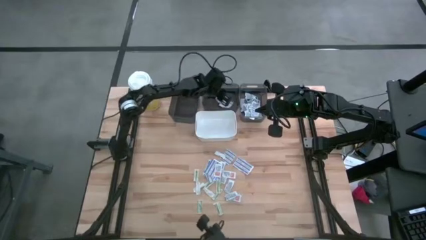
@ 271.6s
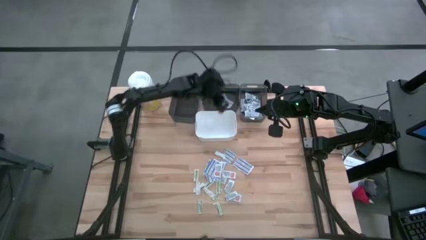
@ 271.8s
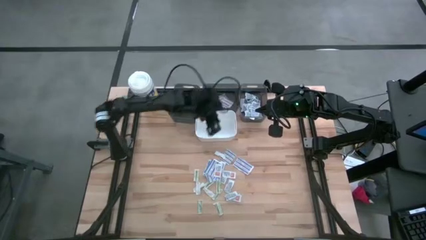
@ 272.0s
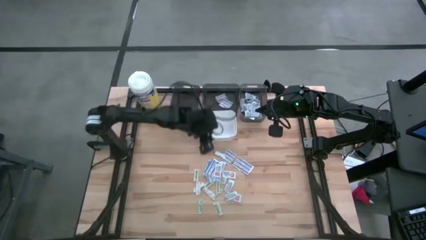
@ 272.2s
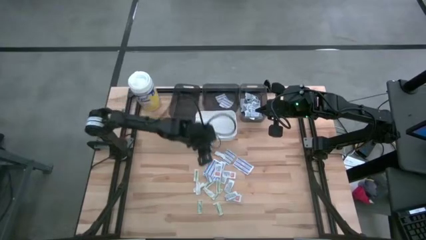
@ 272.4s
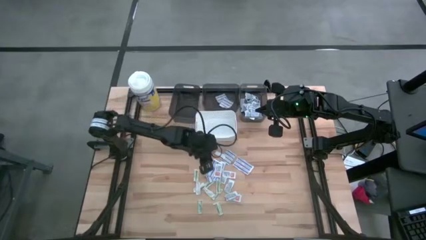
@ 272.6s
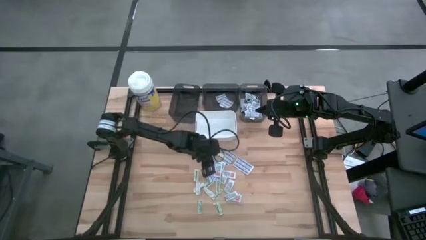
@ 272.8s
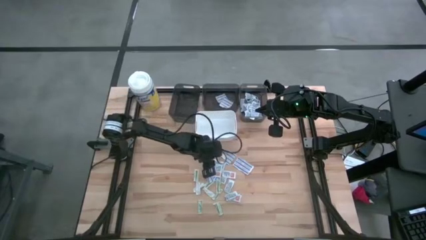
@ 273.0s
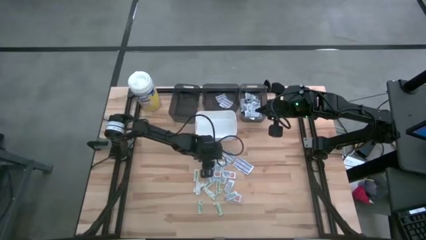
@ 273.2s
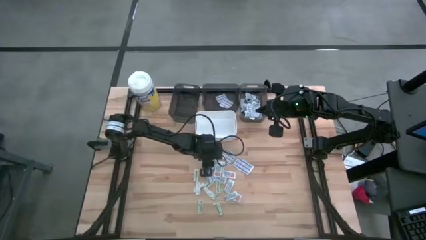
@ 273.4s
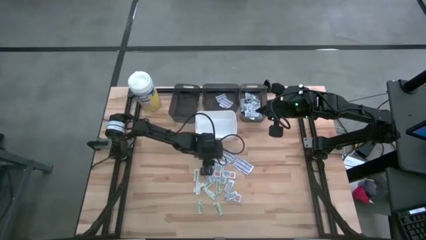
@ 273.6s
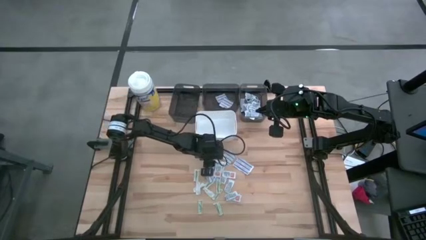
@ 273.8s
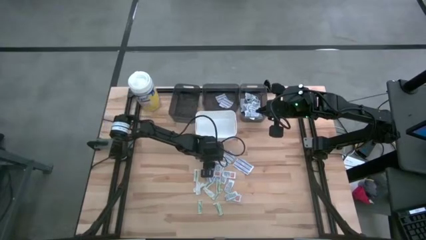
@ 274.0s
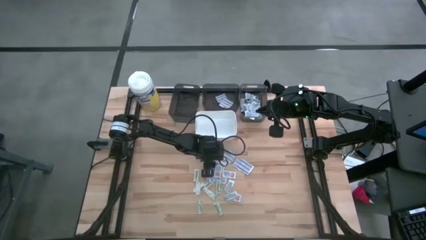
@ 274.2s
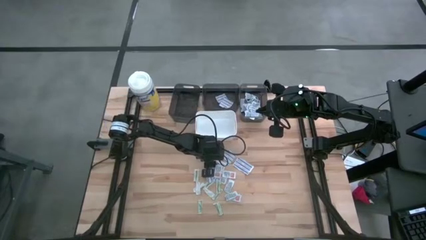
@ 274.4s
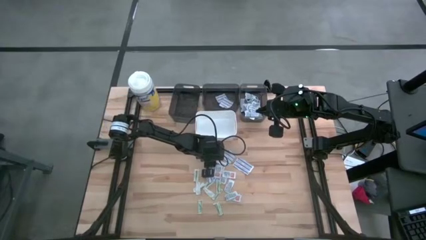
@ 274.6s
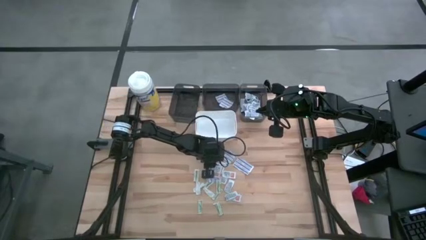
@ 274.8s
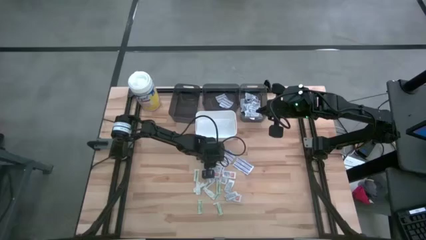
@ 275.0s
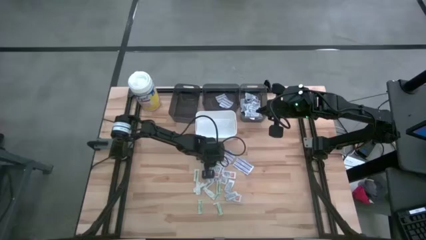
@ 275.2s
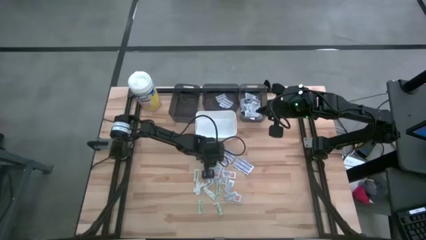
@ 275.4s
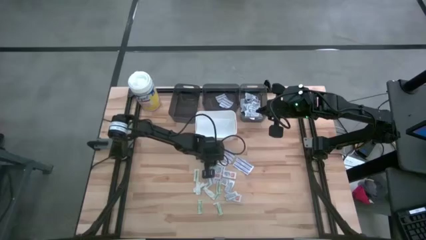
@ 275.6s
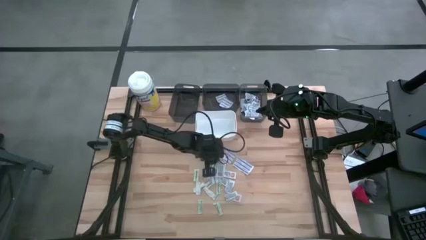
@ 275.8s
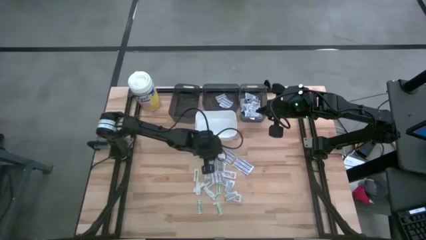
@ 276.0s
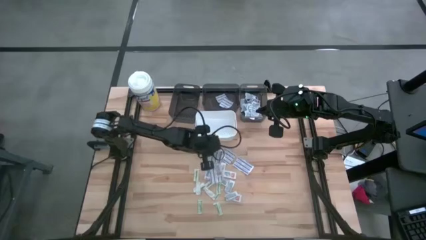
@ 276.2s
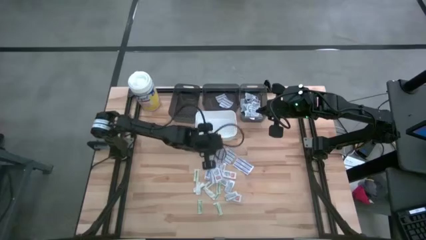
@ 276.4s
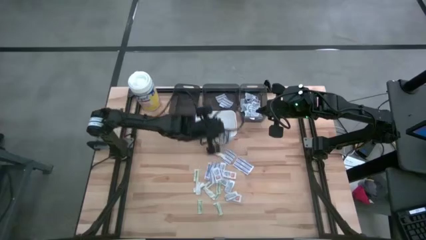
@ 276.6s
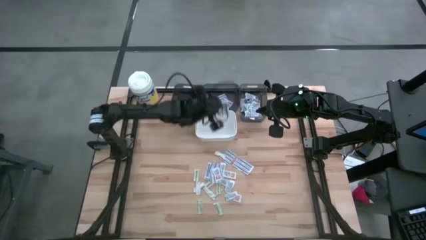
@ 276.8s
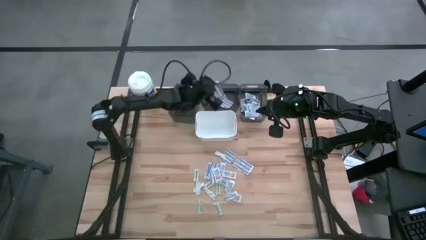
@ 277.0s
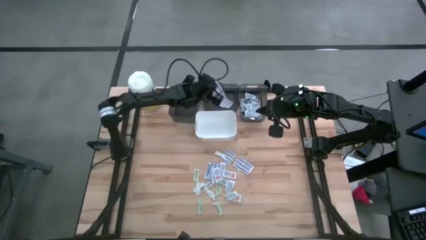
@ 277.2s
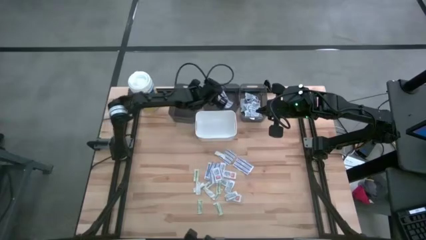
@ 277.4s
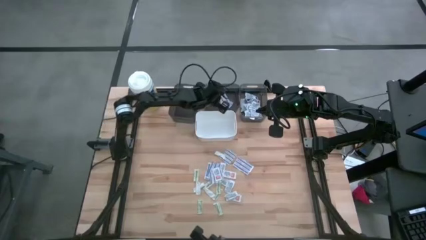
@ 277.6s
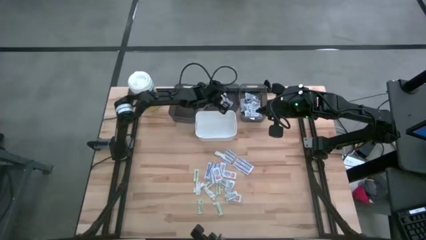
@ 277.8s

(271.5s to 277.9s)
Task: Pick & Place First Aid Supplies
Put the blue bandage pack into the middle black bin

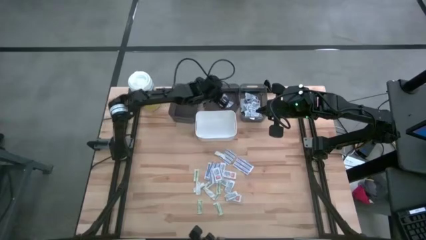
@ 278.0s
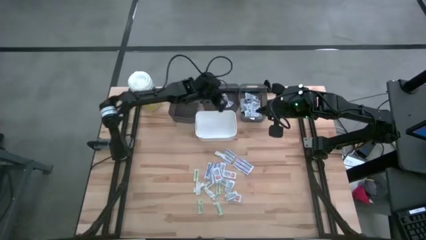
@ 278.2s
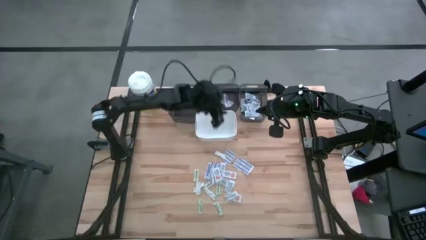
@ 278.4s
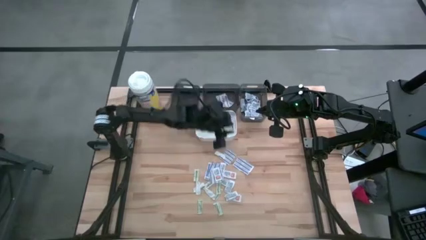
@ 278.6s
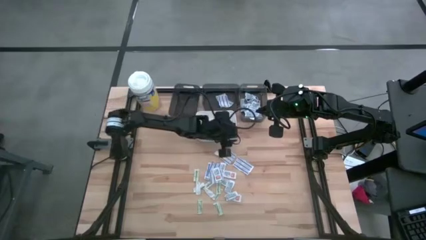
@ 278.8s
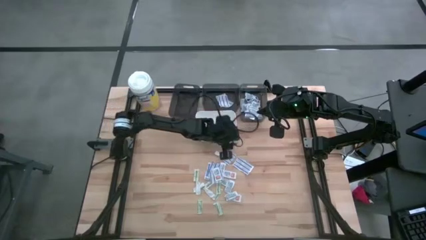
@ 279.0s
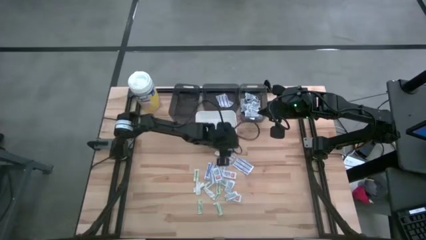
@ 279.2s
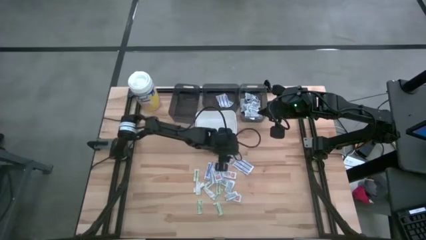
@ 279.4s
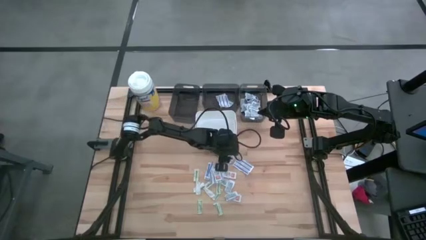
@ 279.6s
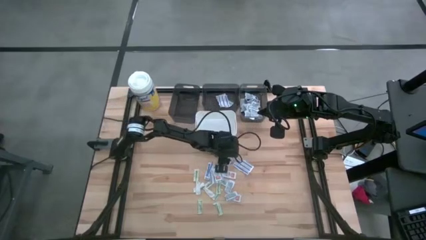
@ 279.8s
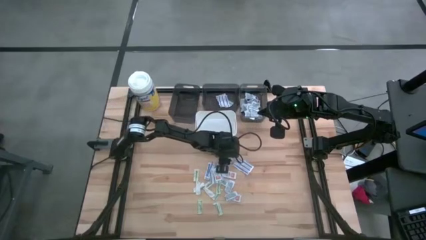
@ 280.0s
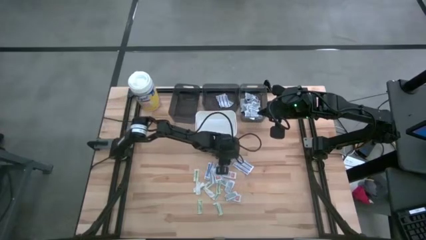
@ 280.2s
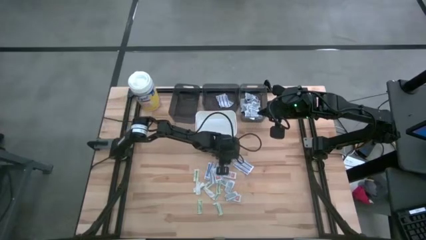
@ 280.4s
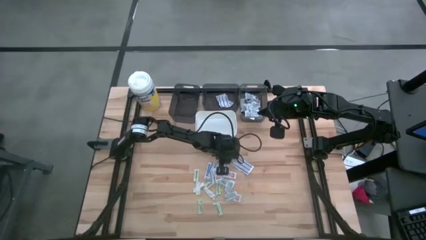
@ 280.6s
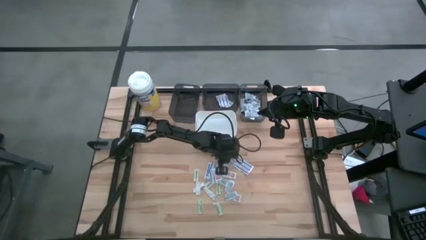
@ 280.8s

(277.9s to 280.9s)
Put the blue bandage pack into the middle black bin

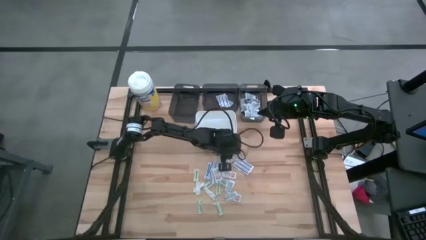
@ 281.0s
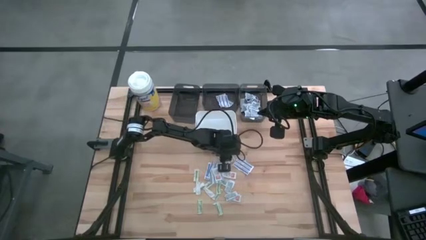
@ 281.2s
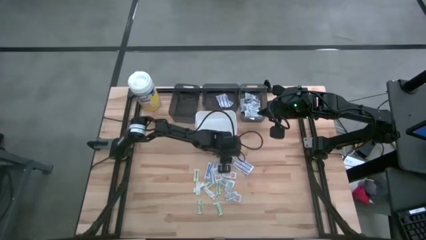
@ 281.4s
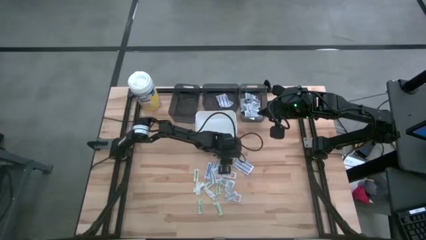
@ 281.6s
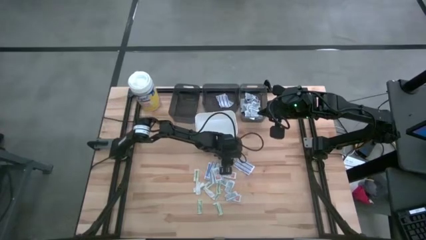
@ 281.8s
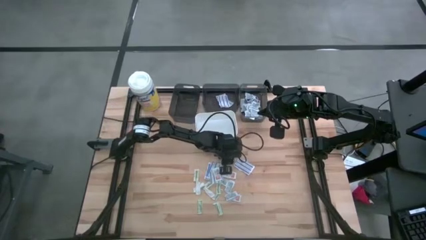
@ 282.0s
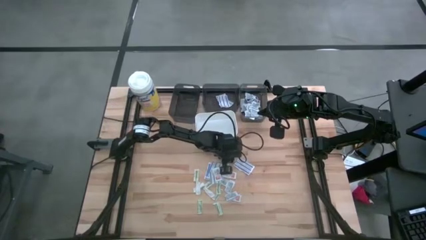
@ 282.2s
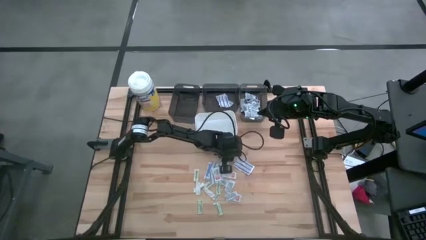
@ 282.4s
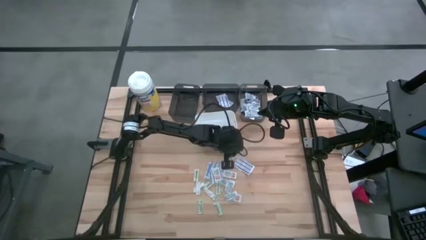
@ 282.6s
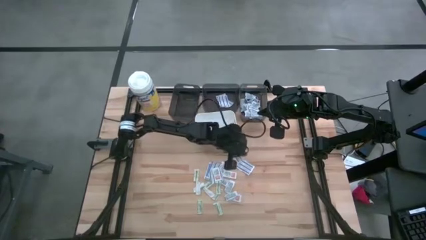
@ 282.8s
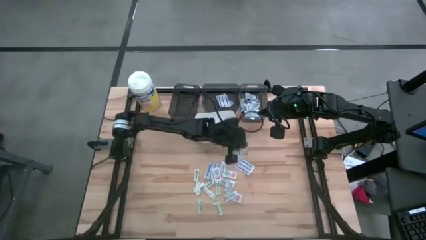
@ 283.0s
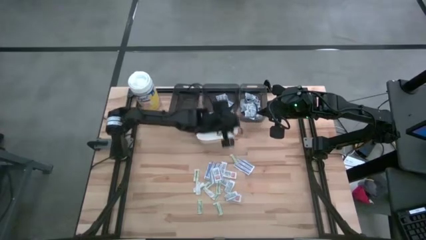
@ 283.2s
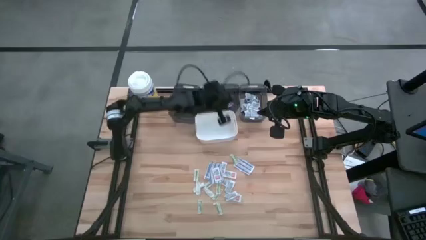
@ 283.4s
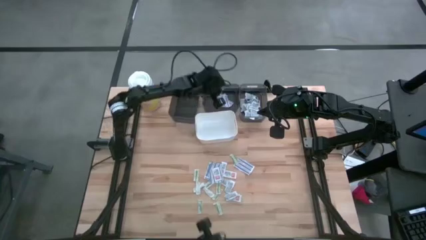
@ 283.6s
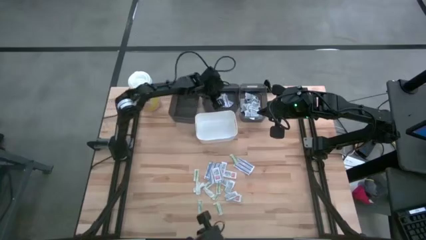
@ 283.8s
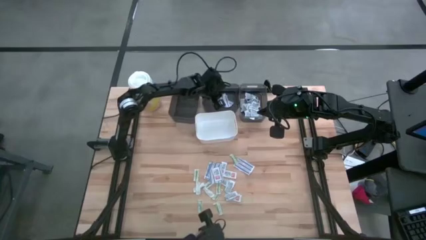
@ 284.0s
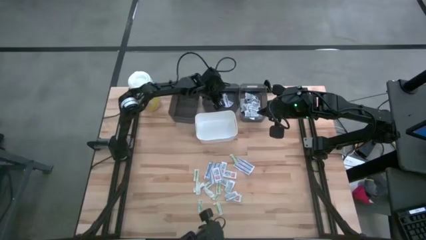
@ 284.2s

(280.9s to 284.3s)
Put the blue bandage pack into the middle black bin

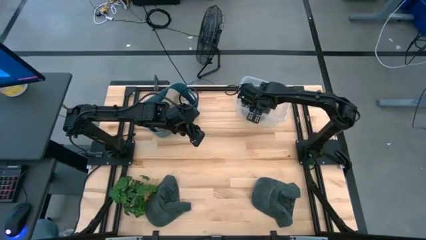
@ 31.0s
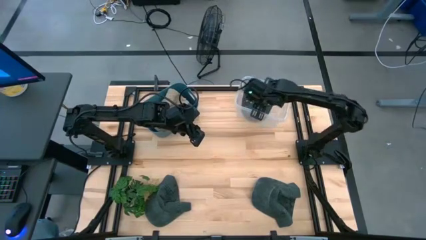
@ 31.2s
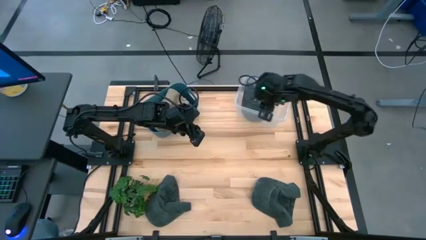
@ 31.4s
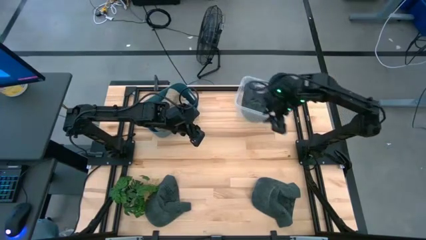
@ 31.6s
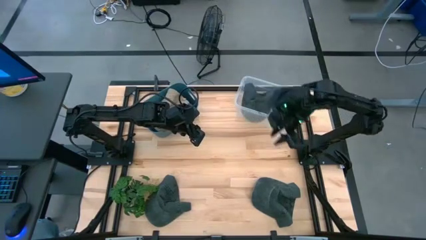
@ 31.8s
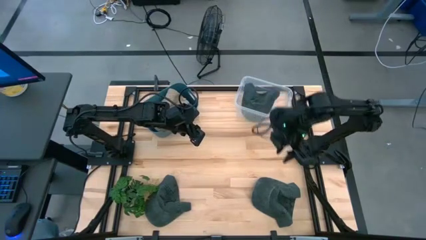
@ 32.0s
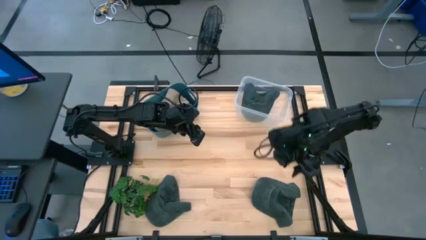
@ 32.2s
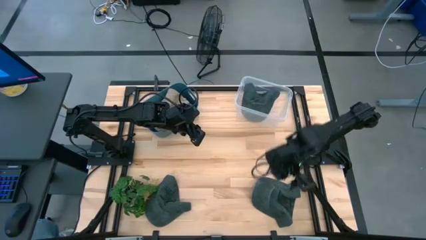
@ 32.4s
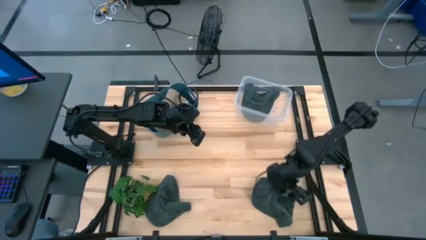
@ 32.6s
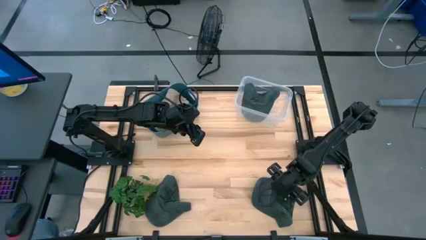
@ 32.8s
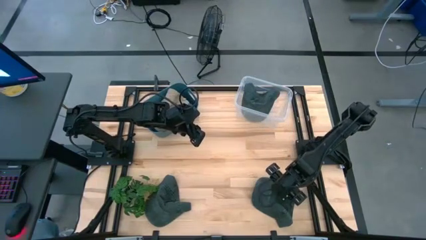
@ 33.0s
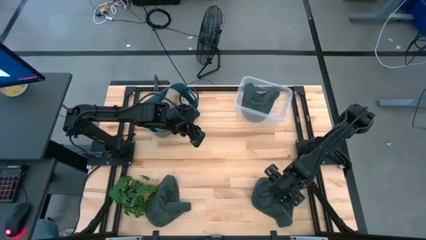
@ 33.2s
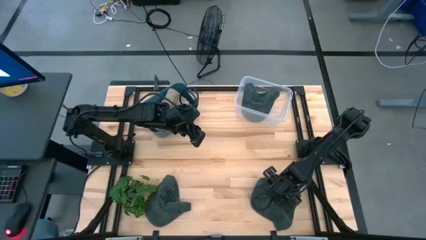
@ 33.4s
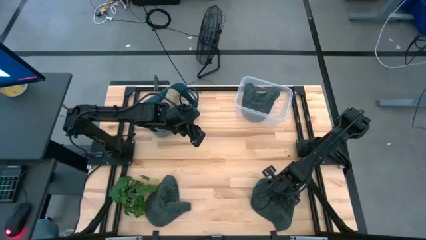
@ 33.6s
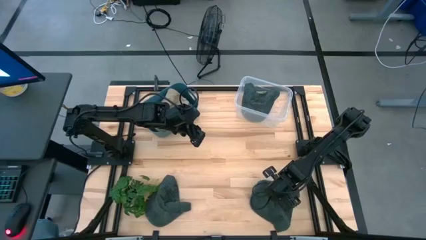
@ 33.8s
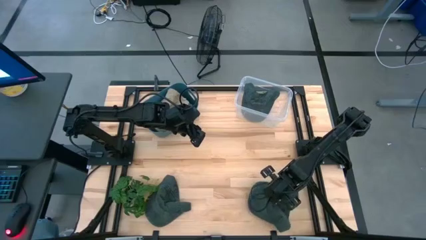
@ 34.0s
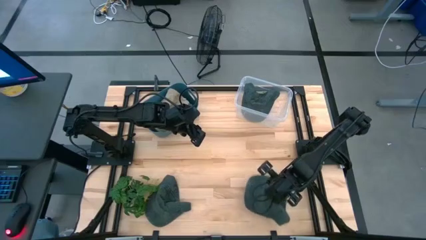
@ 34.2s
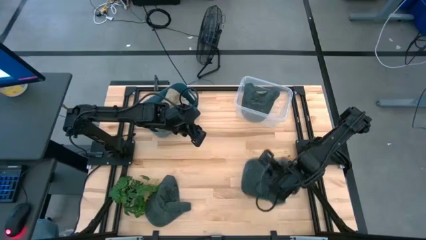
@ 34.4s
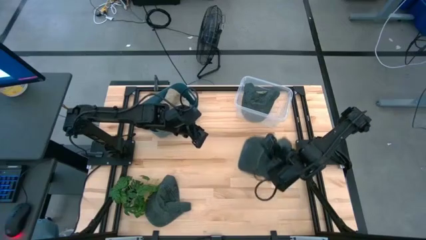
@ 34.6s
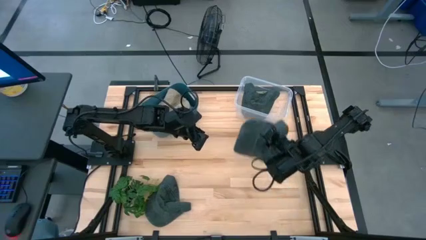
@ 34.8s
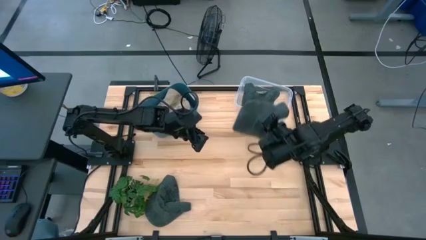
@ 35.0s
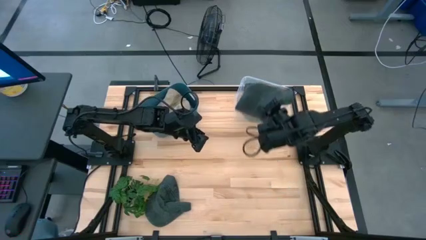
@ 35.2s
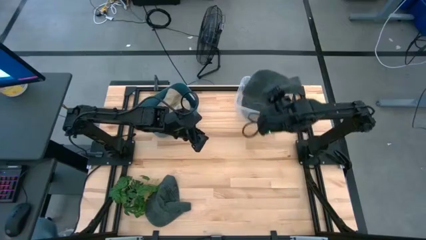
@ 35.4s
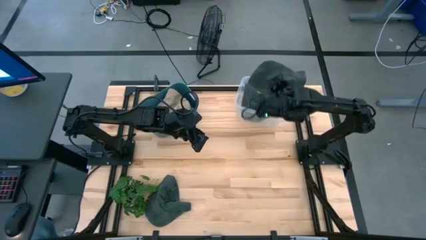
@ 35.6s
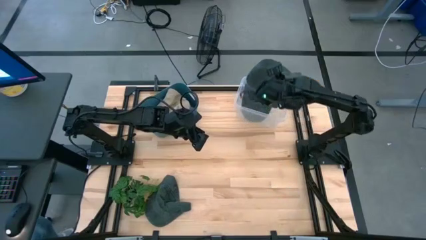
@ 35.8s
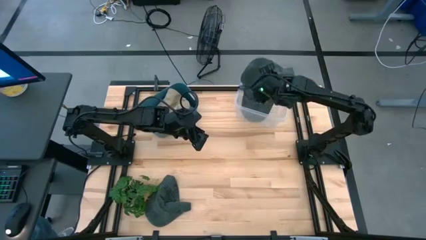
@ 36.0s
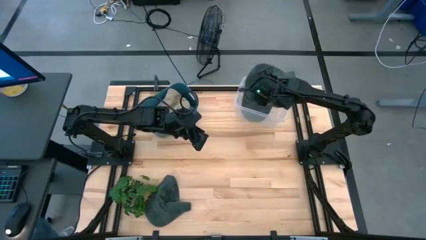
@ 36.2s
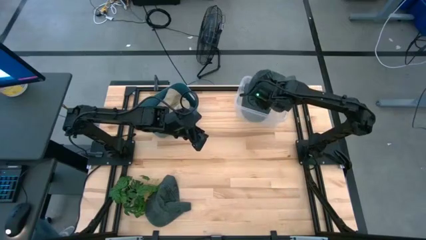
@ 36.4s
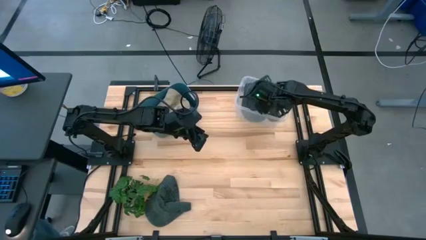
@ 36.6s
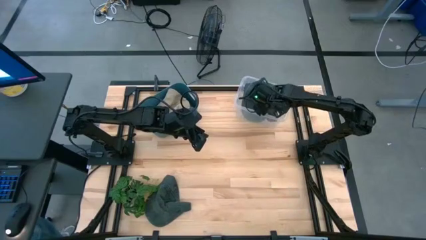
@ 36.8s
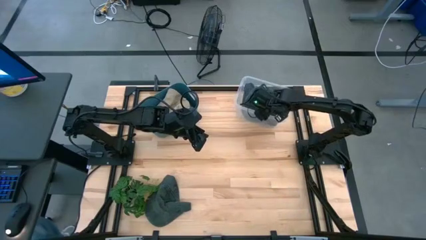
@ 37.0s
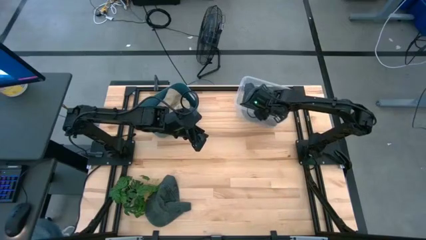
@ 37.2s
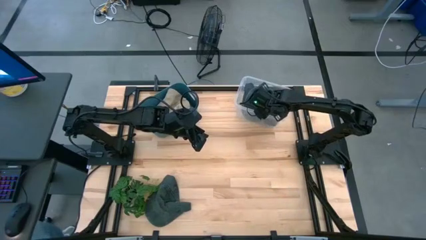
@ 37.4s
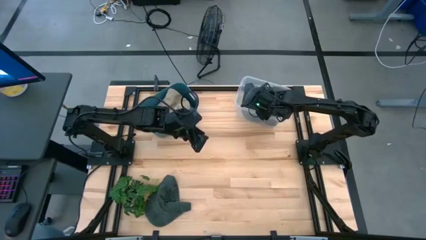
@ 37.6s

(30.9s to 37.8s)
Task: Pick & Place hat
Put the right black cap into the transparent bin
